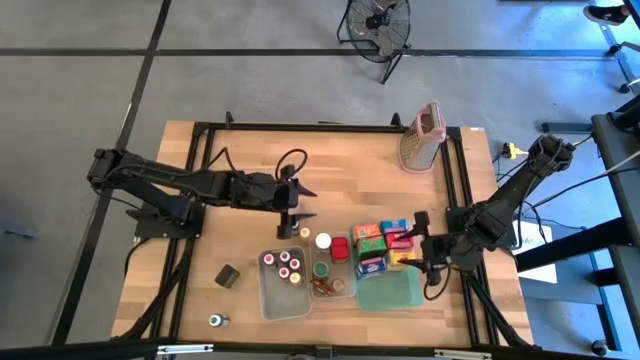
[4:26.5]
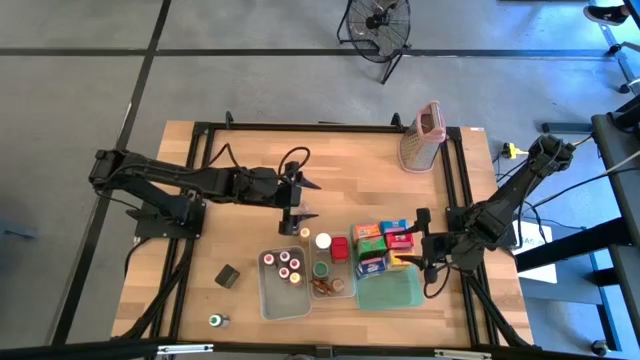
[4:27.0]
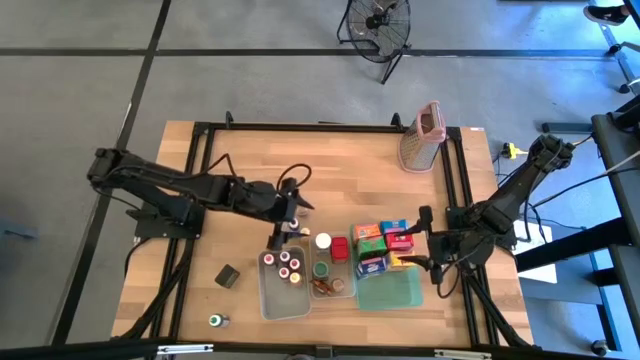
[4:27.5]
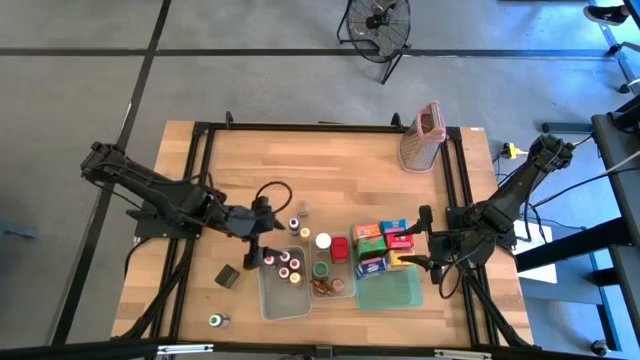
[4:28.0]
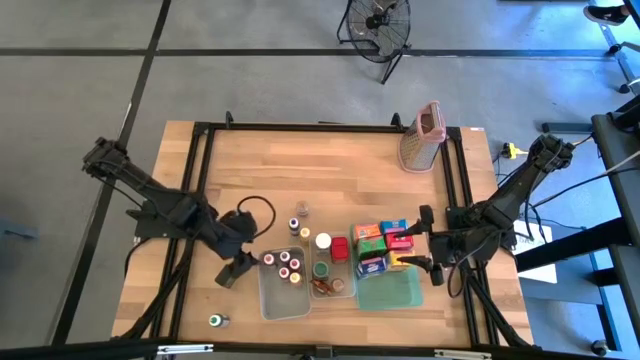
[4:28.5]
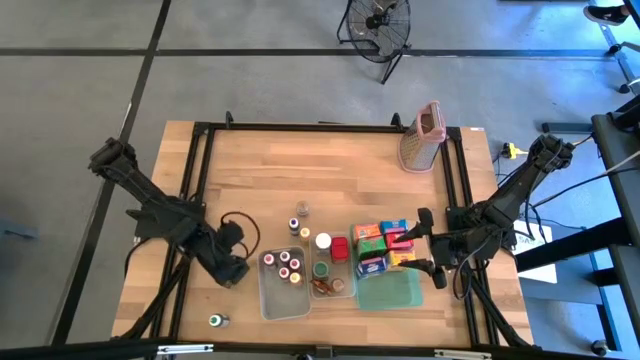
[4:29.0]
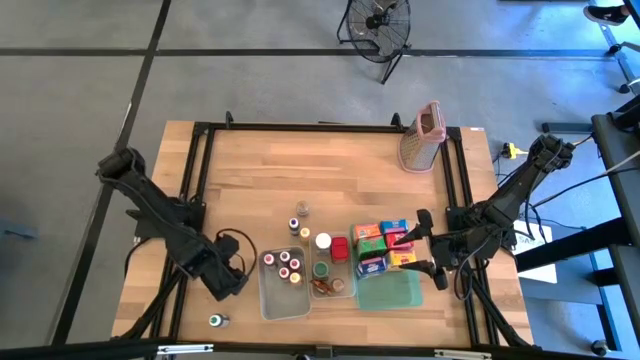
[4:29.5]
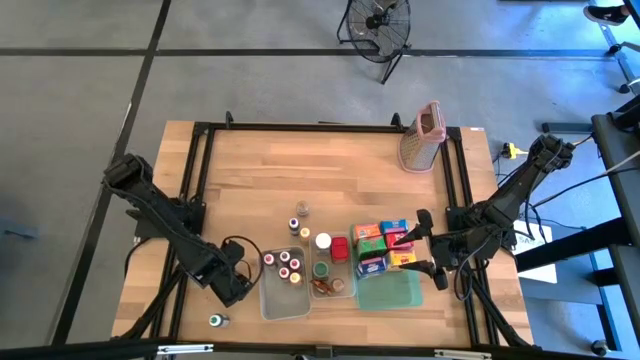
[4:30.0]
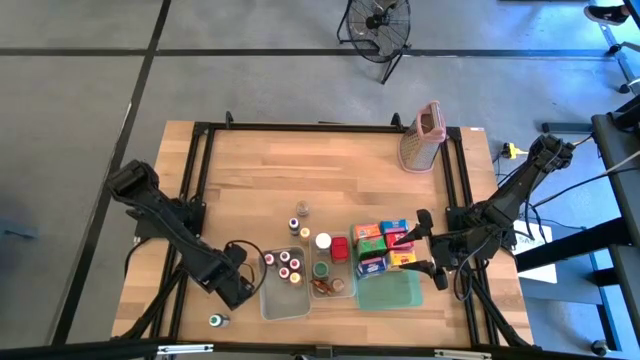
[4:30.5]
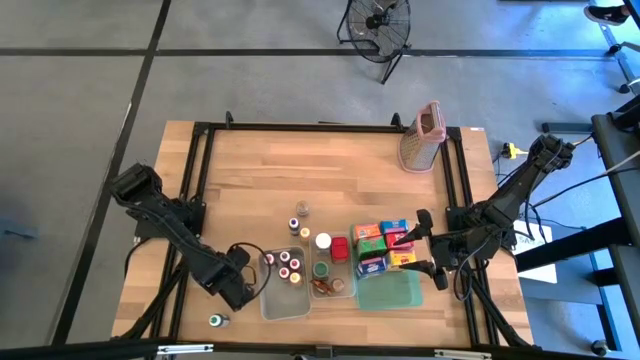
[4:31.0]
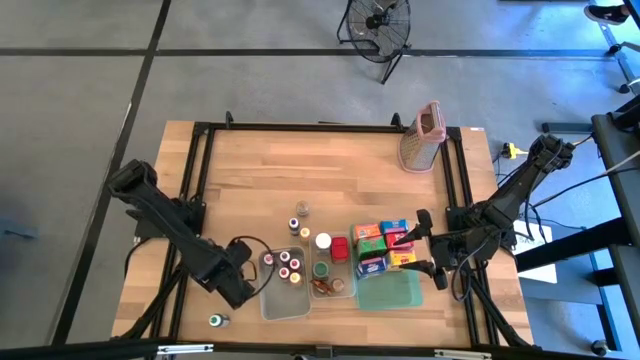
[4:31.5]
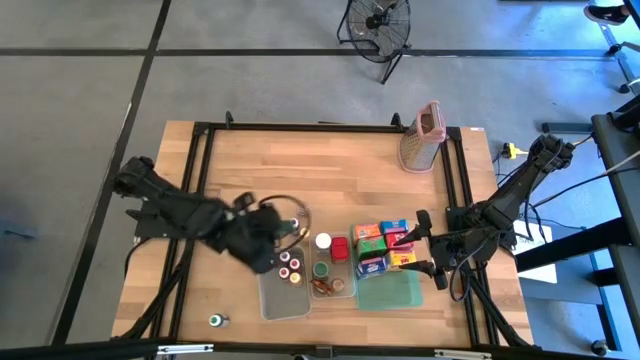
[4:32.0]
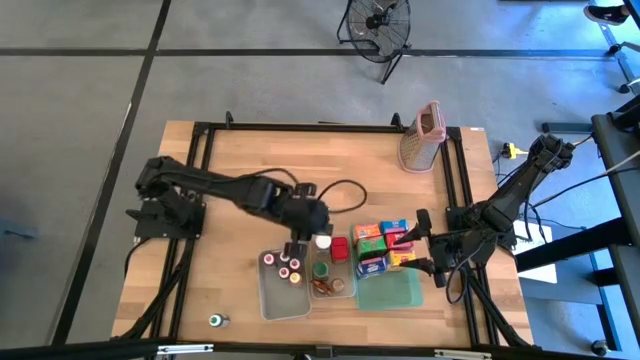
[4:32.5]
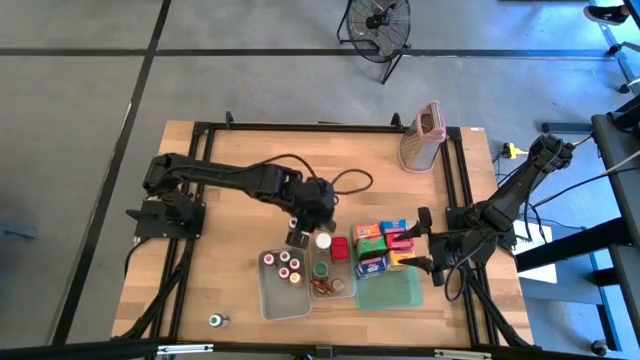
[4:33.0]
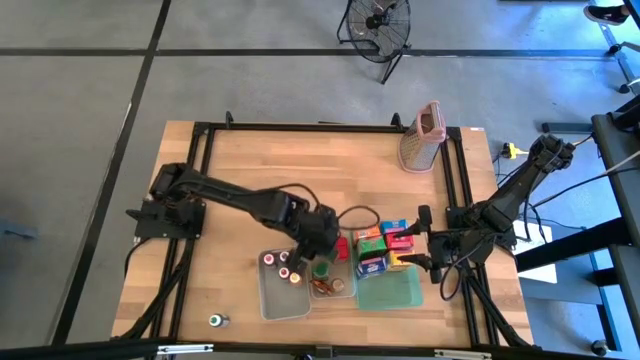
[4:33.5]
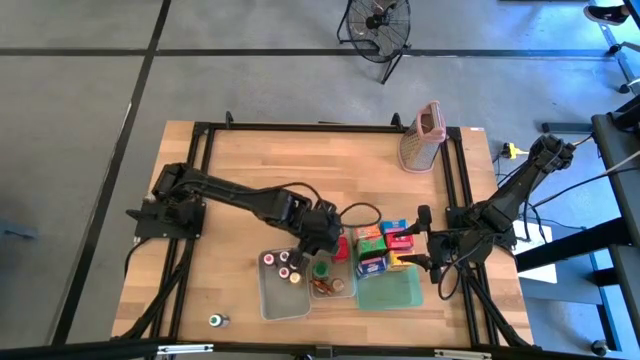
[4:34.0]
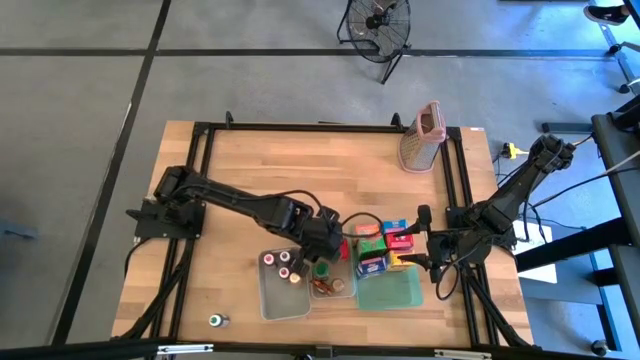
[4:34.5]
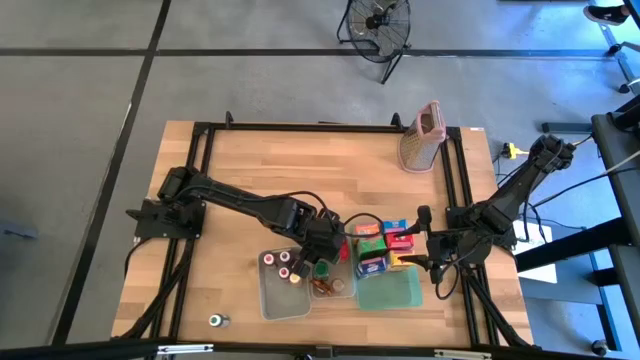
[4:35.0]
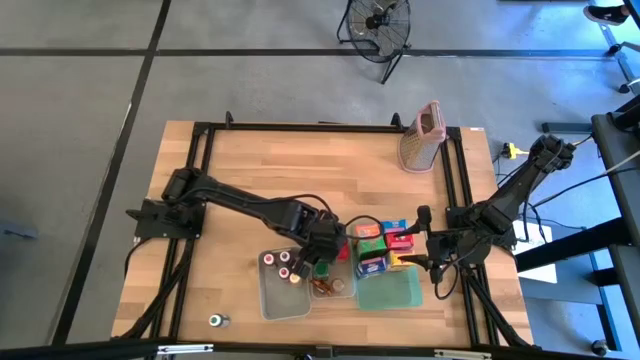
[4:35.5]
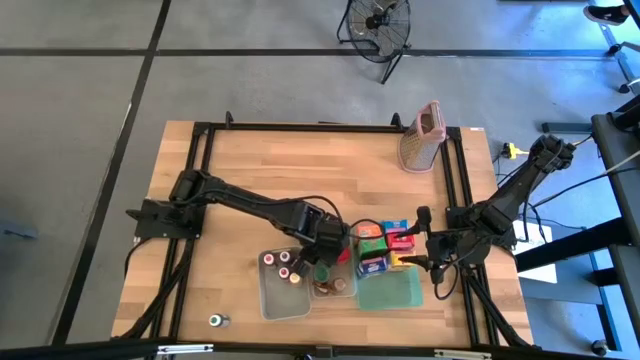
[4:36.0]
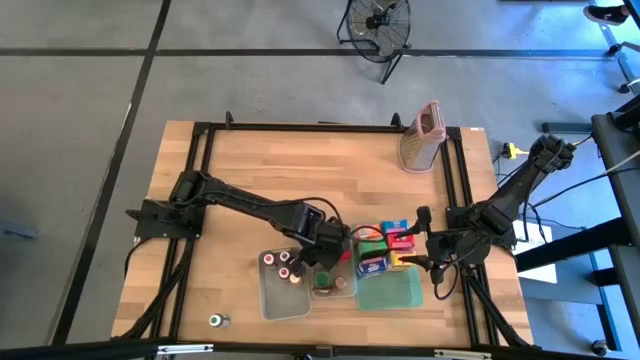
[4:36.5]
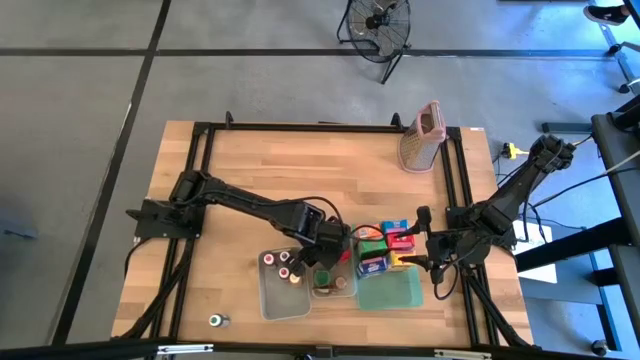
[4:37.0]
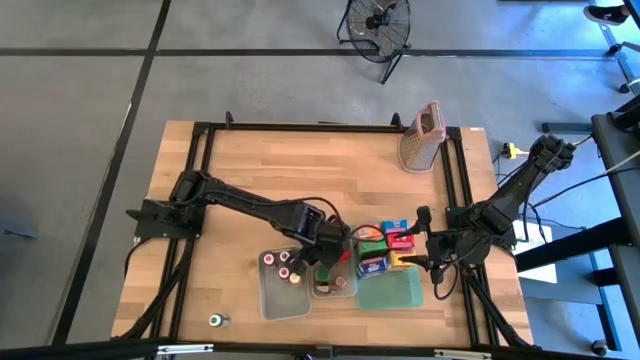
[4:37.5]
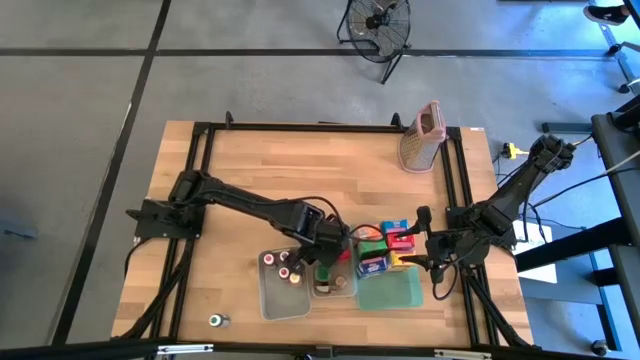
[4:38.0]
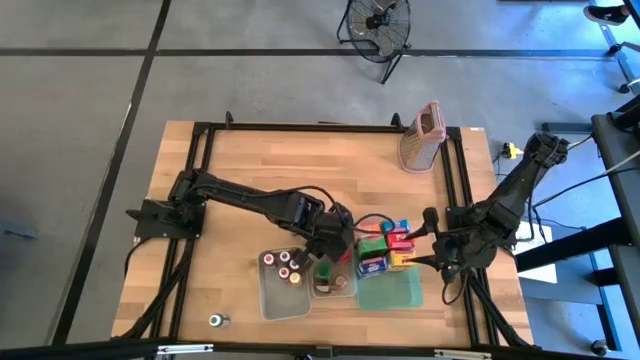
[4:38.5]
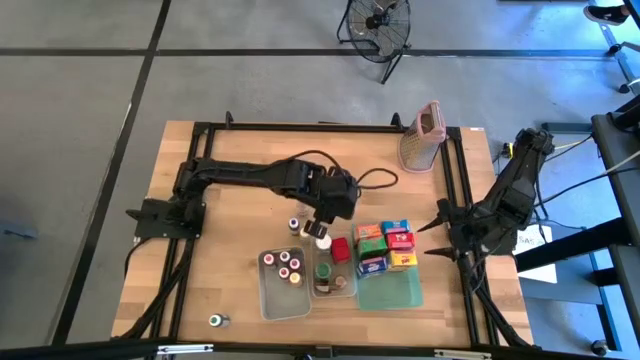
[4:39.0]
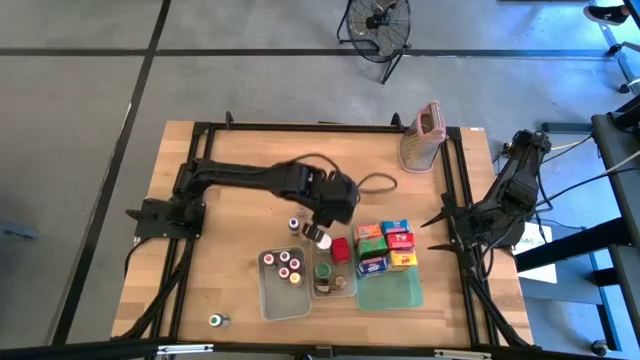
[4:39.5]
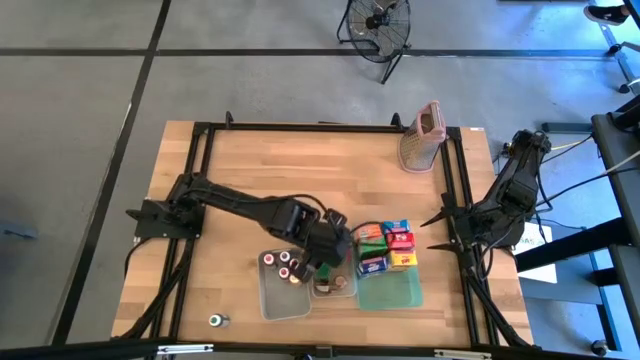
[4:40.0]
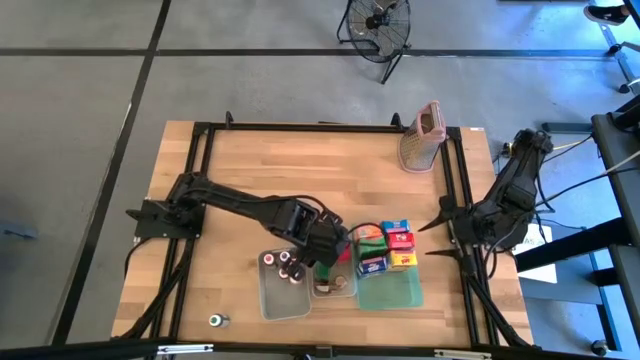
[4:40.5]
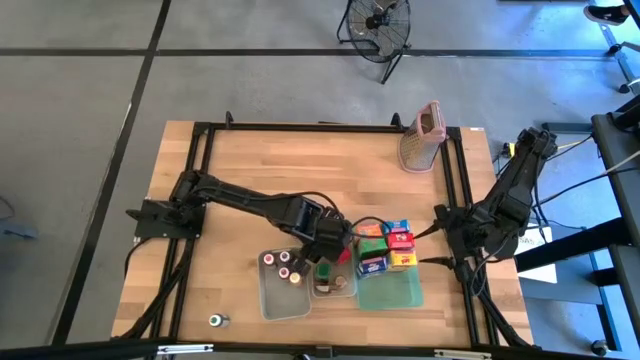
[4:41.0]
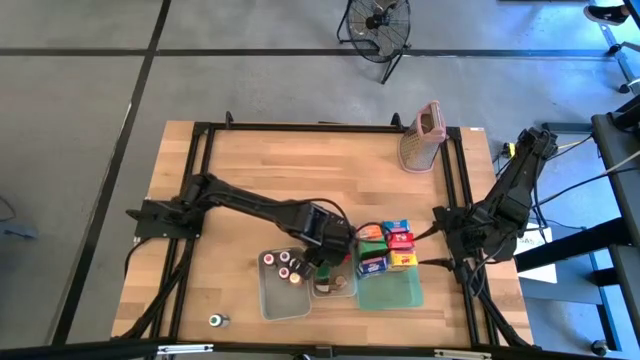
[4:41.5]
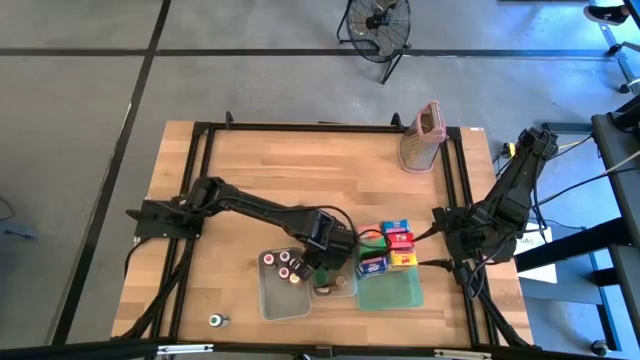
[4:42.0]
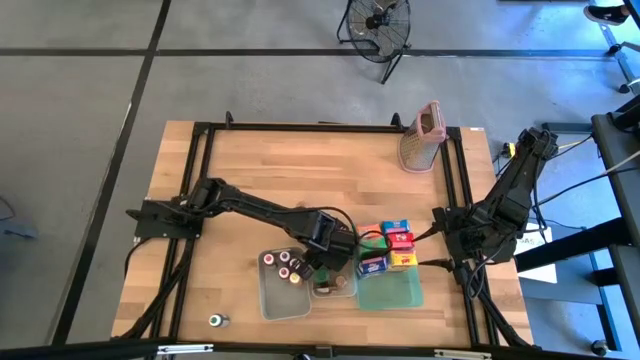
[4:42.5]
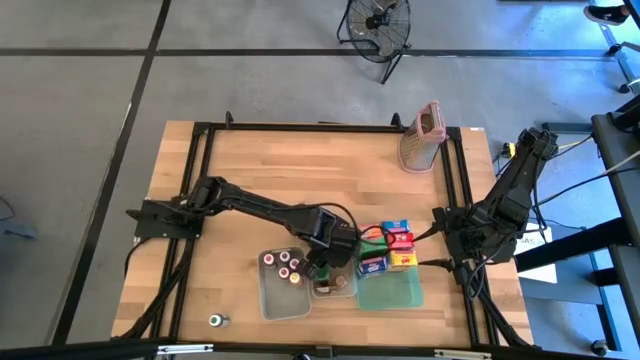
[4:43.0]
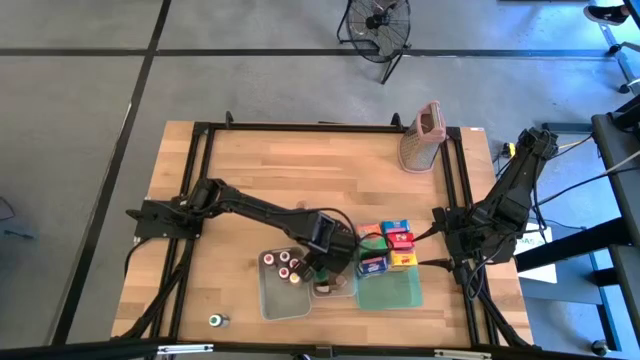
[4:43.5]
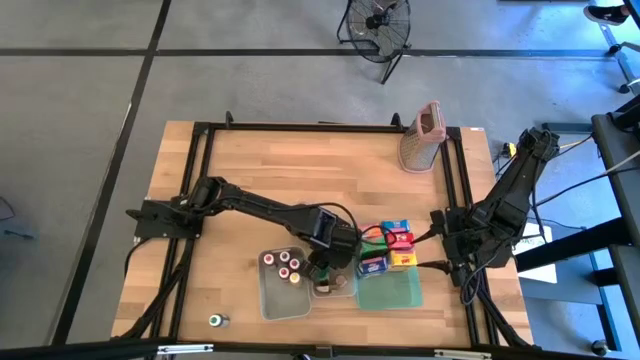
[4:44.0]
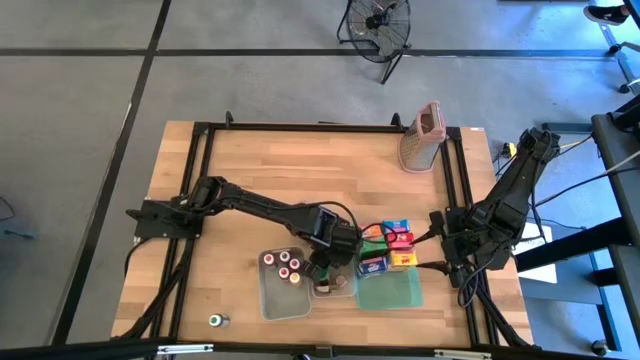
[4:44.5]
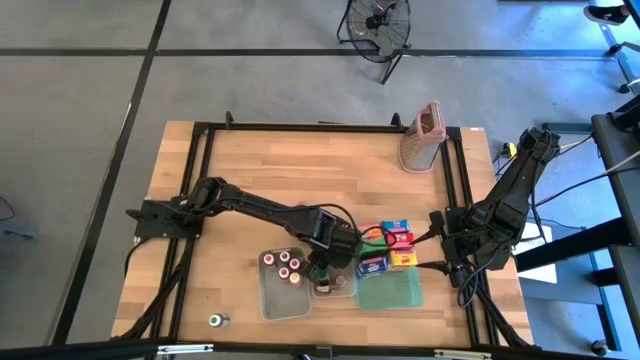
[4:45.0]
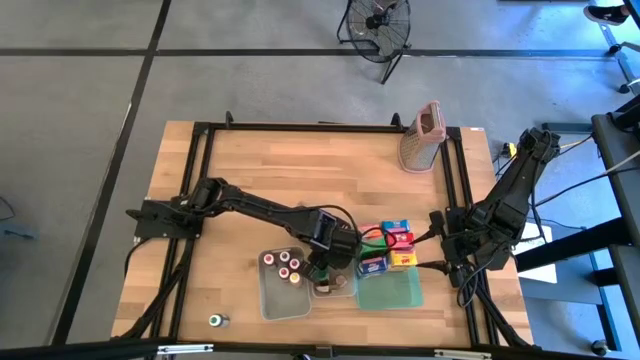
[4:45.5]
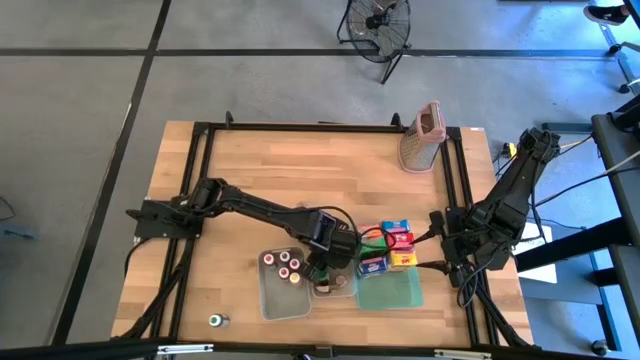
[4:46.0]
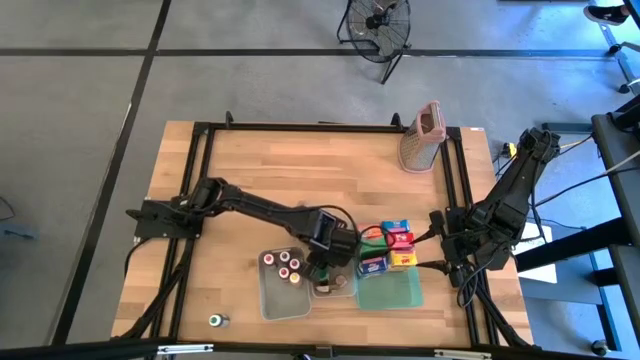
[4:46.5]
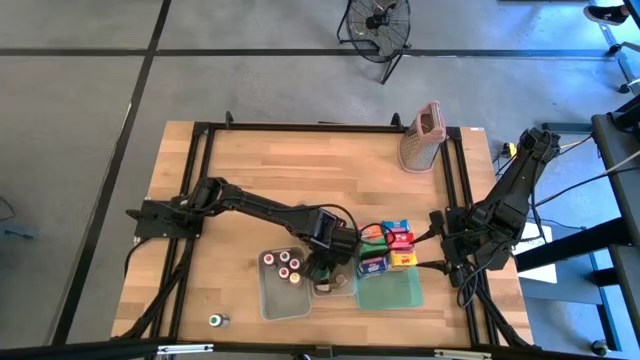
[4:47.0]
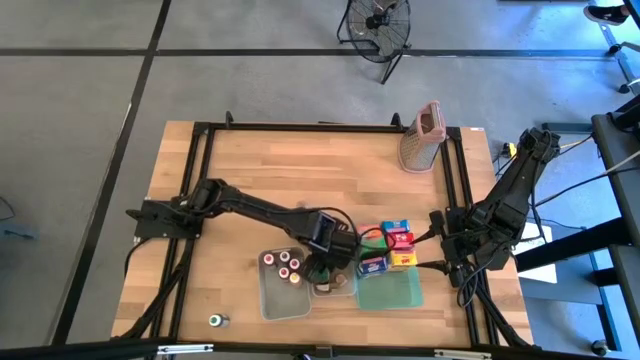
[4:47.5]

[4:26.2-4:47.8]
Task: Pick & Place Kitchen Items
Put the black seasoning can into the white bin
